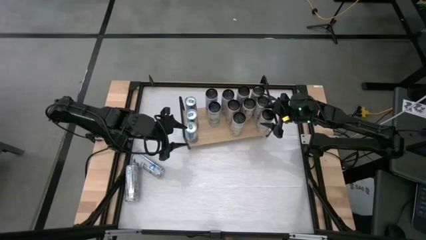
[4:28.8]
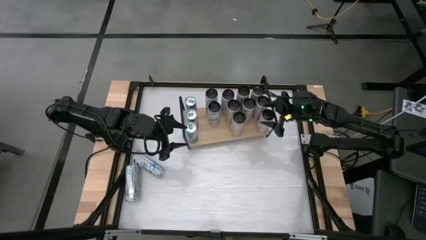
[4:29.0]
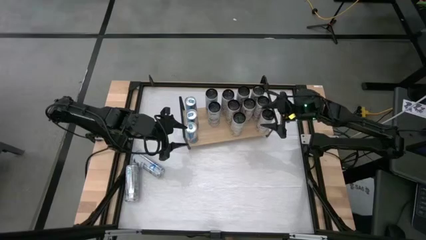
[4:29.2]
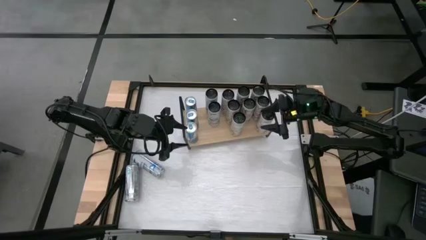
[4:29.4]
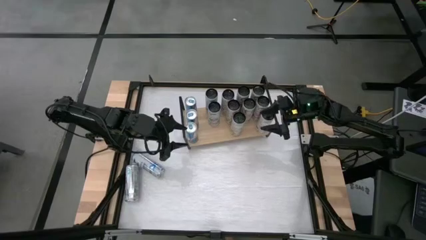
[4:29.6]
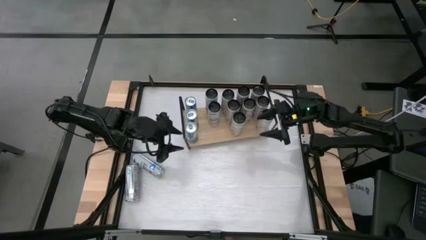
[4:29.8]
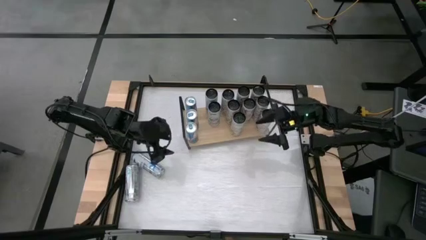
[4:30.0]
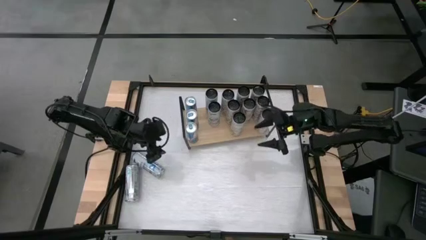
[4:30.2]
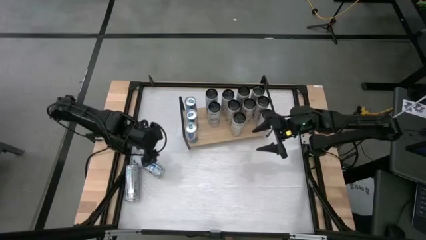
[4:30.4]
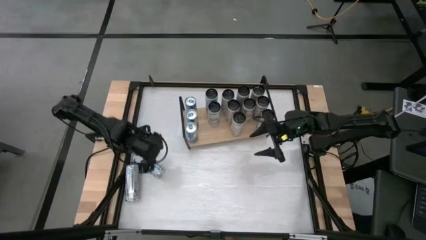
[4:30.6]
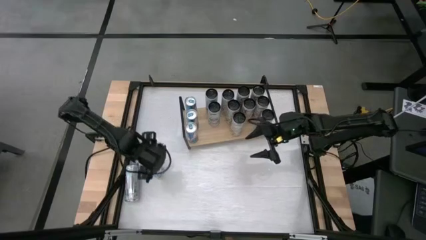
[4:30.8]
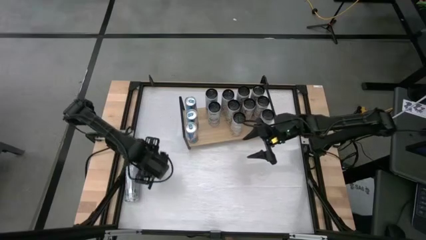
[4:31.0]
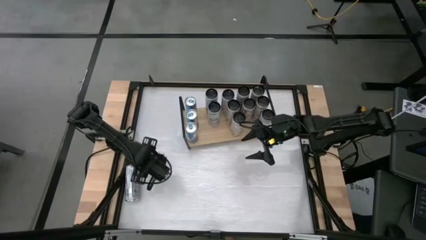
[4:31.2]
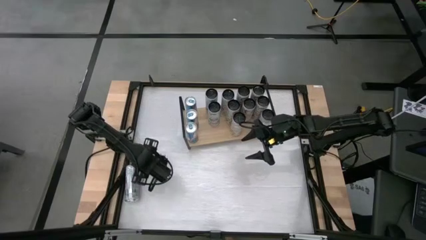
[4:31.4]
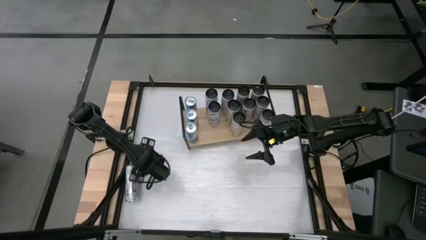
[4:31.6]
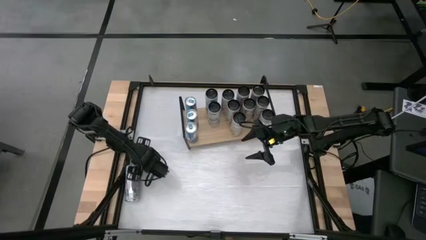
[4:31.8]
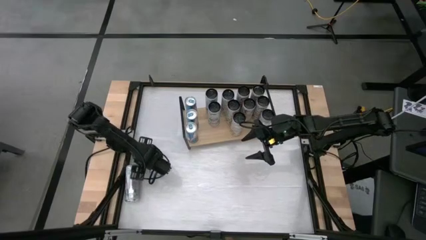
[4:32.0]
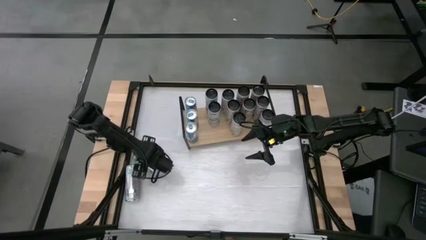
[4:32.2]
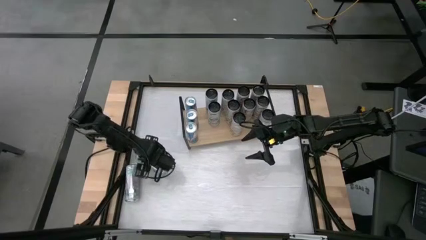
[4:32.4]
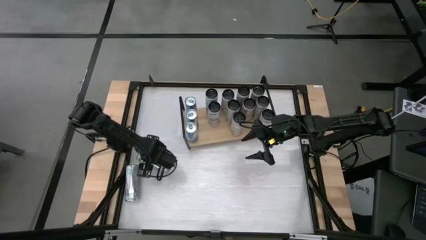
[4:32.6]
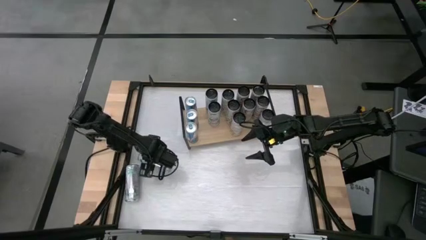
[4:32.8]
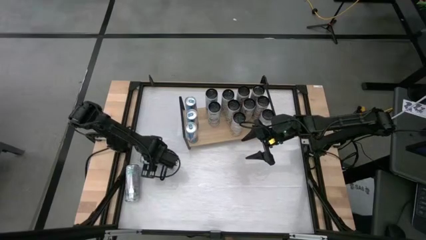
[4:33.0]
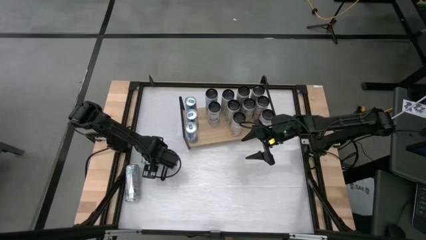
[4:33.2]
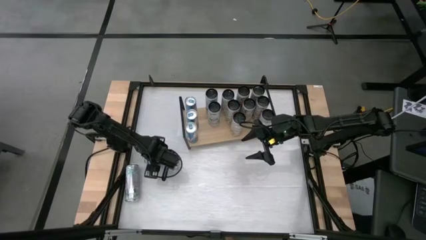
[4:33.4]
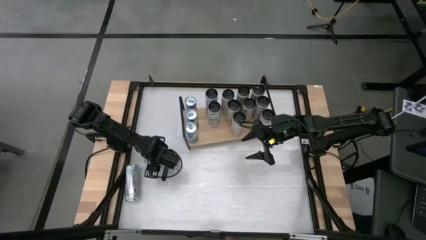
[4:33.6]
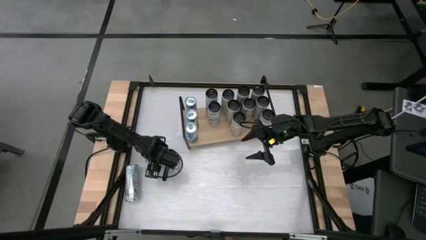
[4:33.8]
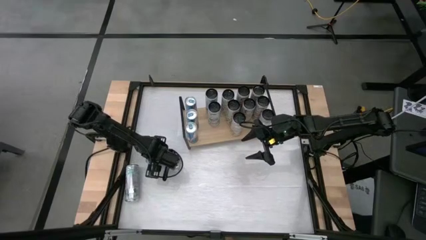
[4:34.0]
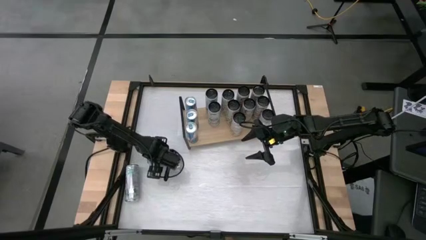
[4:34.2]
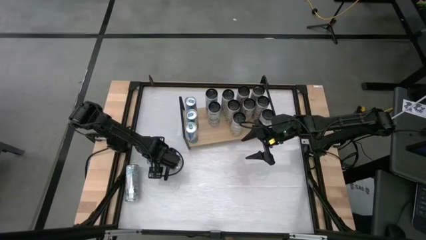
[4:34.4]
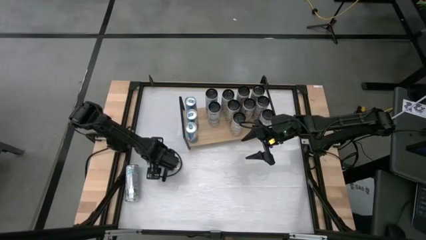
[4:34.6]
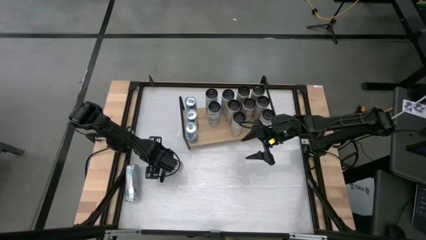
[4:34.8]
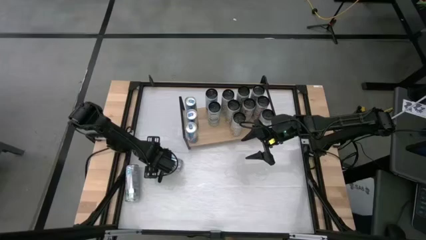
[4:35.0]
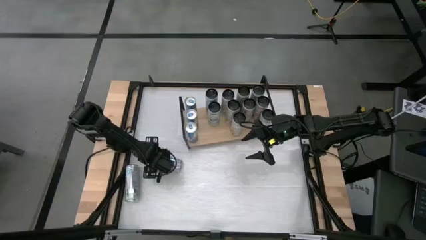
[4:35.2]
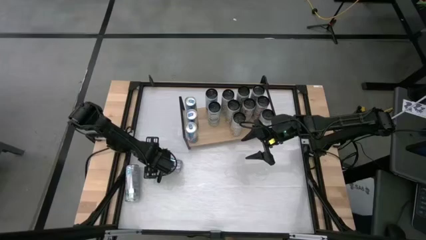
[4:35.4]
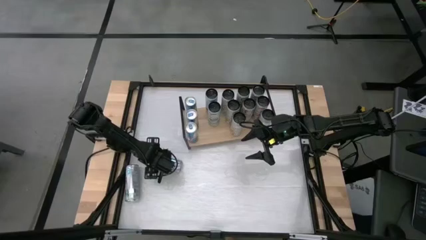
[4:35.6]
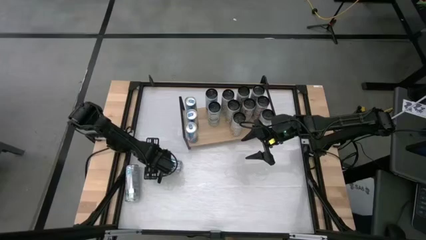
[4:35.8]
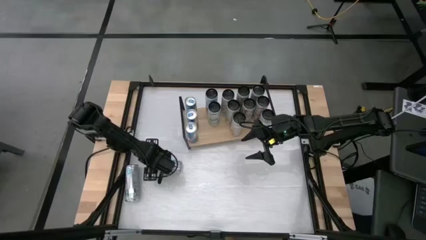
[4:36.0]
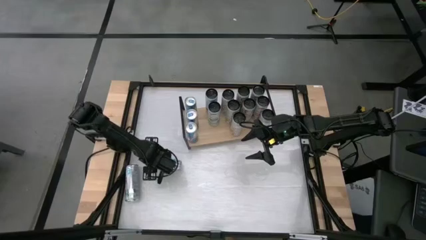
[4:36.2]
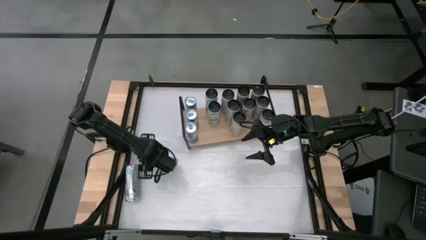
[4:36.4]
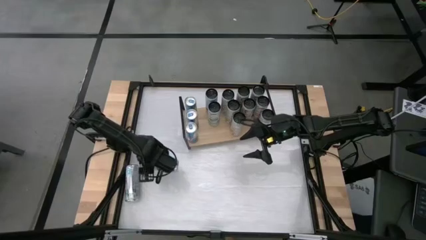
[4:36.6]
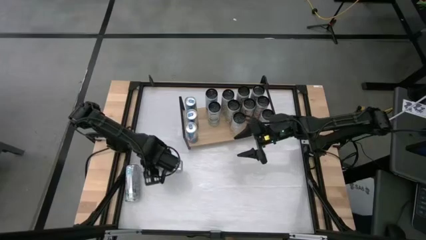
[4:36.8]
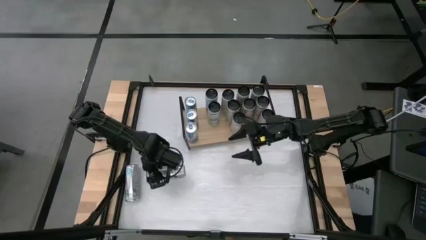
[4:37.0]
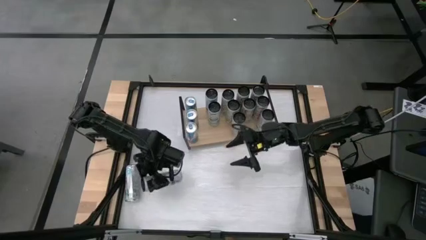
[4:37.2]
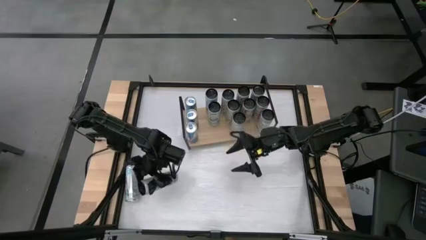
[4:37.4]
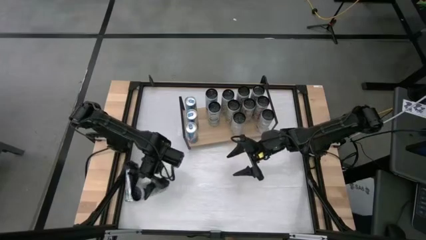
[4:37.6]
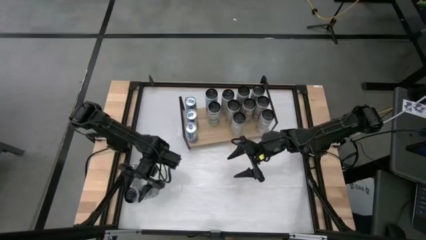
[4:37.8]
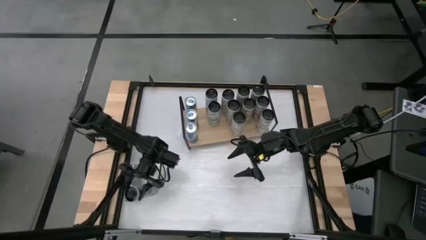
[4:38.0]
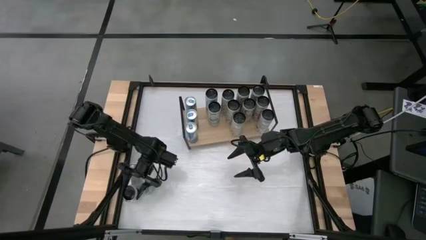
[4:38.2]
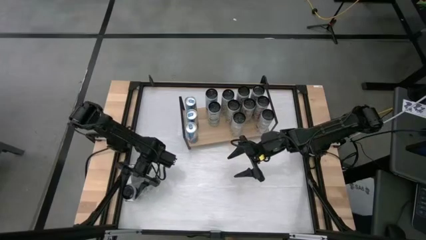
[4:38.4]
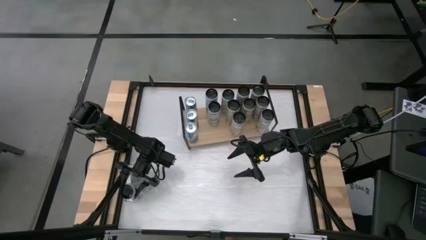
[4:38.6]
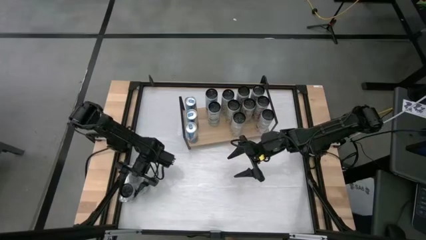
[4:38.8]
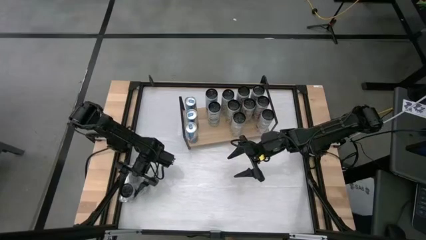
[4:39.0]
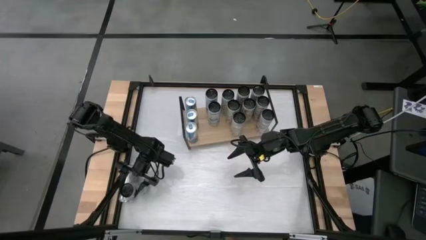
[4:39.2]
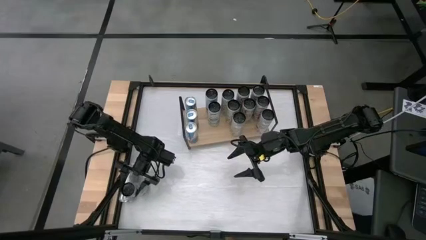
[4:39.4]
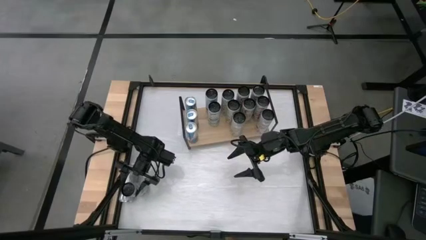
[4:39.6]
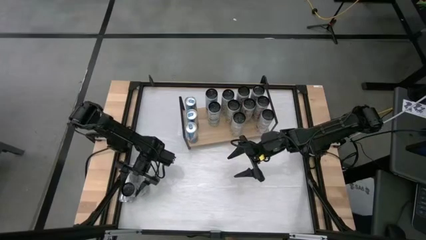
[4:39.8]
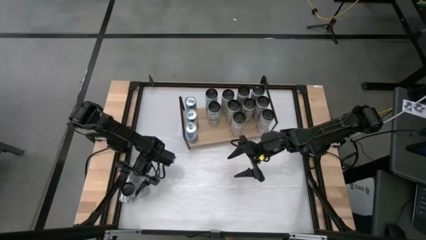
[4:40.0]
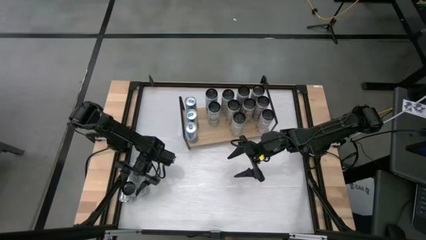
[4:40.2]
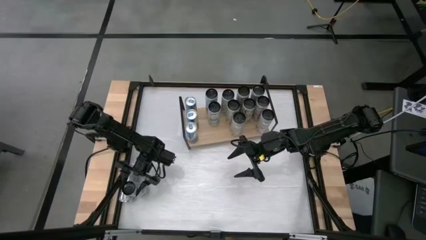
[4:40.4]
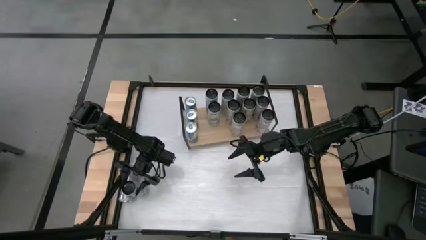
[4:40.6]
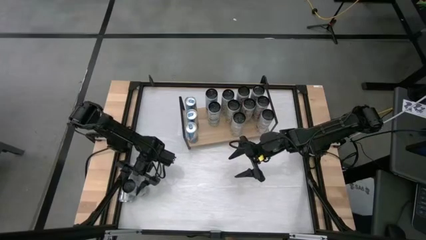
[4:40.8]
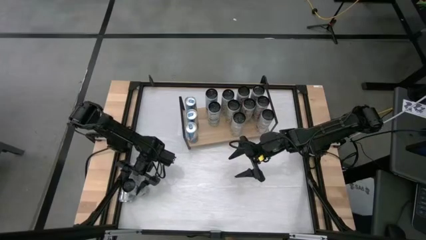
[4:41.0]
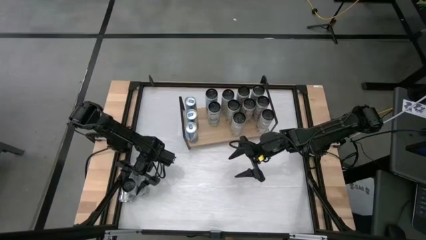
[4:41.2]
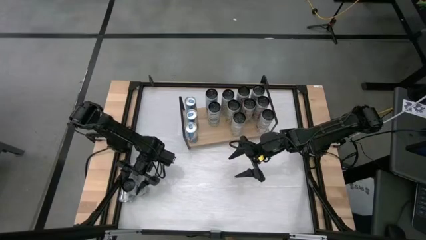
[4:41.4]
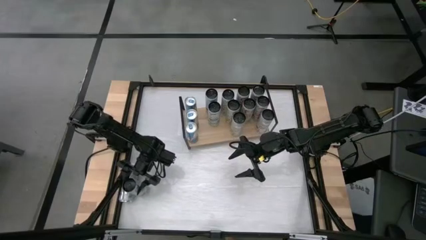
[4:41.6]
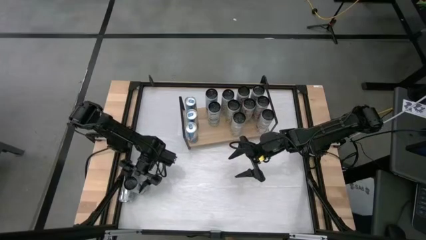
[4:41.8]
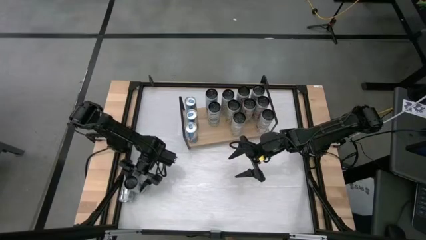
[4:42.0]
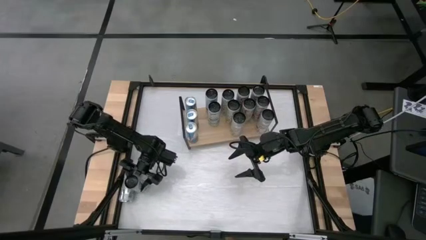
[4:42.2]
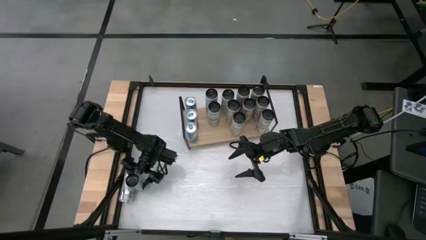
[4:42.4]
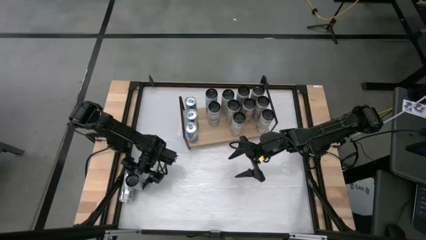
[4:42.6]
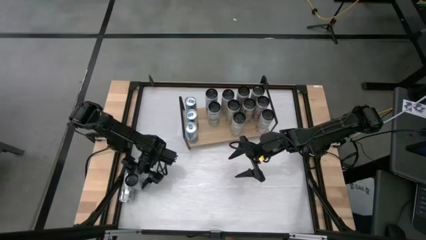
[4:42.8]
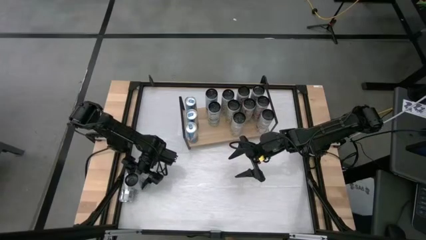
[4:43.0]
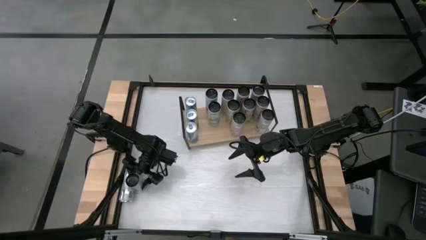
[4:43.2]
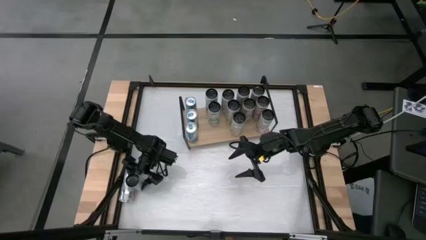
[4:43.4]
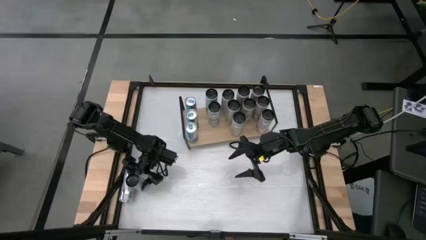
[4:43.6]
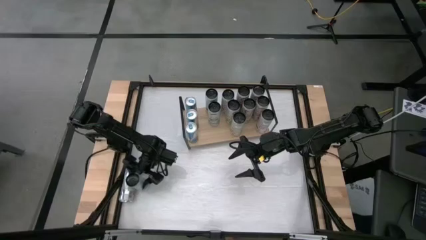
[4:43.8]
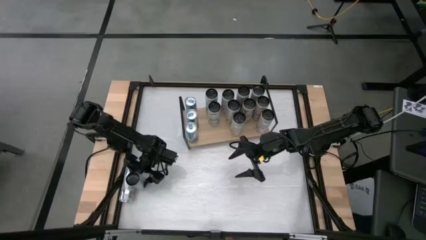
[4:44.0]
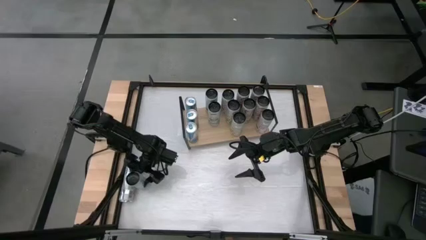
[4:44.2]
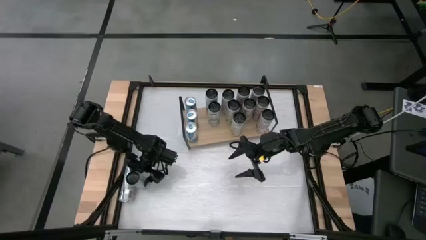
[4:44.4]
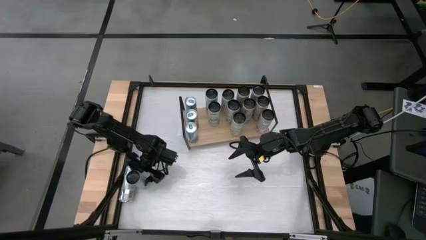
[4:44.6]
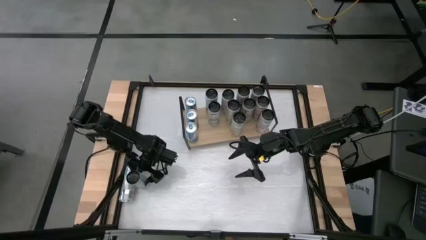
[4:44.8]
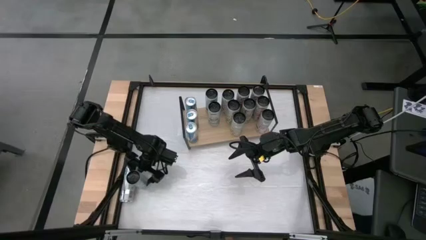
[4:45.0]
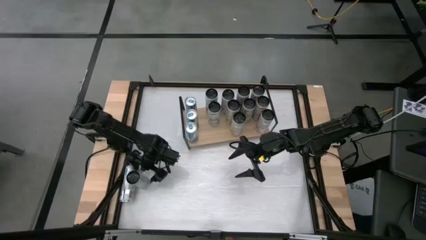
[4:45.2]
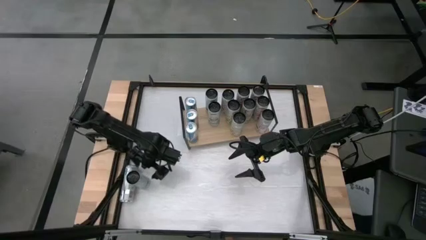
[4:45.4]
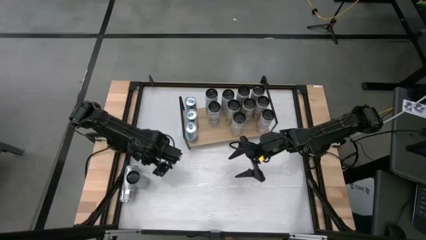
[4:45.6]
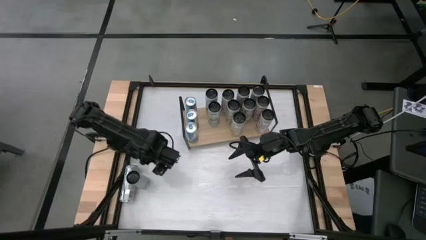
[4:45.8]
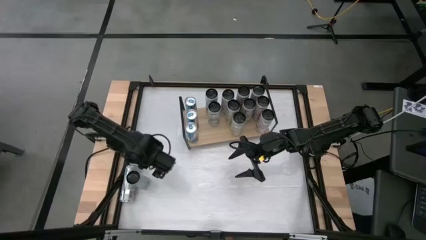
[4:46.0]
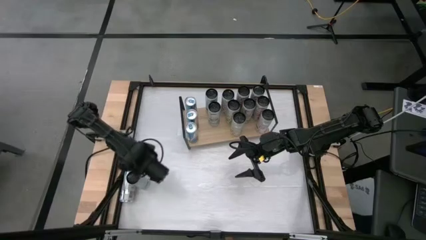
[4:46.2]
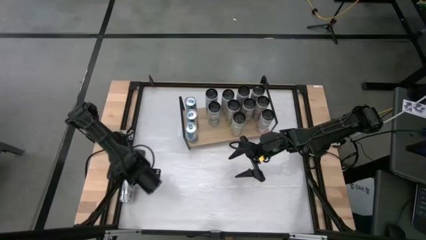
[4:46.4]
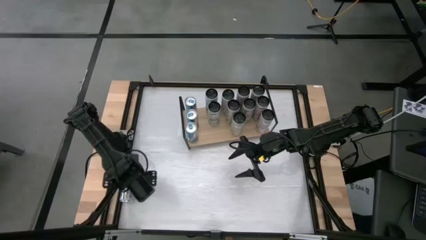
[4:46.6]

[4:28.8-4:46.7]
Task: Place canned beverage on shelf
Put the white-blue soda can on the shelf aligned with the other white-blue soda can
